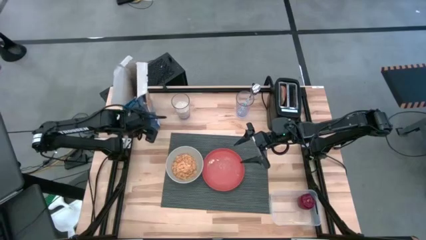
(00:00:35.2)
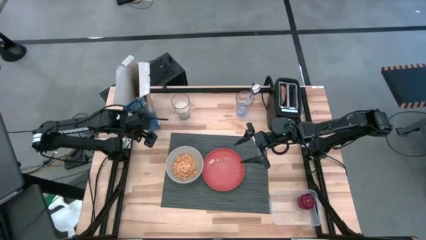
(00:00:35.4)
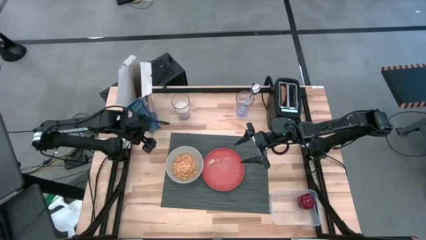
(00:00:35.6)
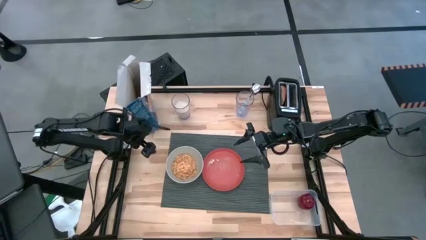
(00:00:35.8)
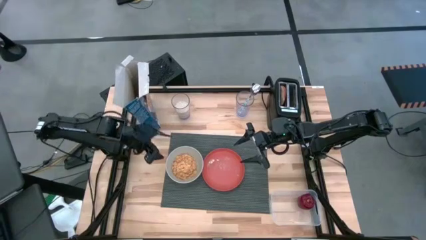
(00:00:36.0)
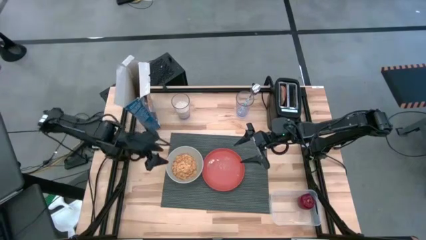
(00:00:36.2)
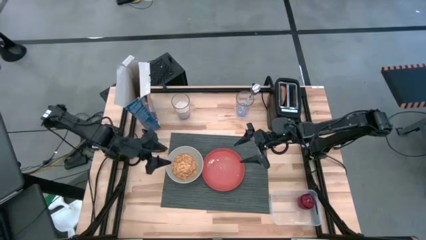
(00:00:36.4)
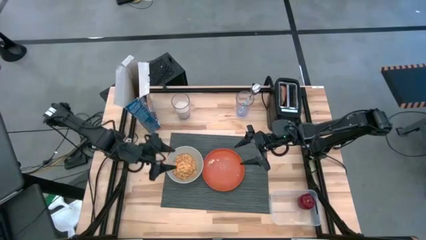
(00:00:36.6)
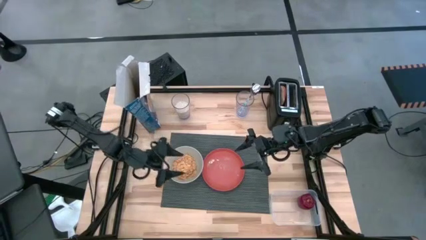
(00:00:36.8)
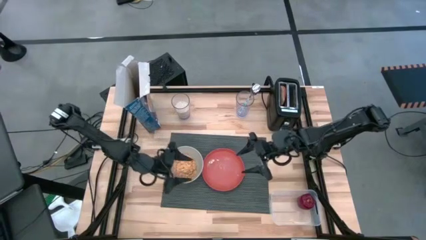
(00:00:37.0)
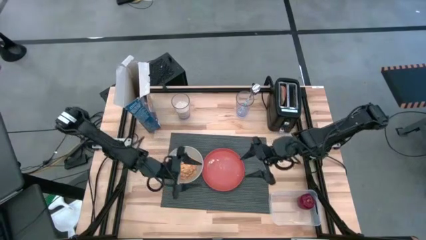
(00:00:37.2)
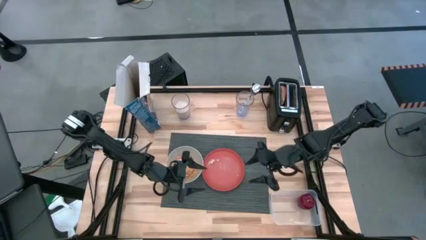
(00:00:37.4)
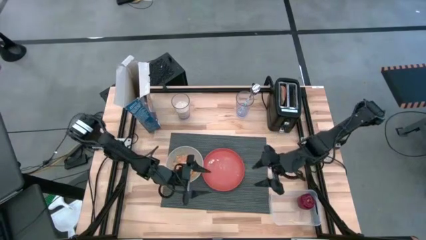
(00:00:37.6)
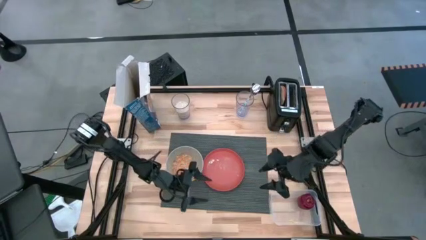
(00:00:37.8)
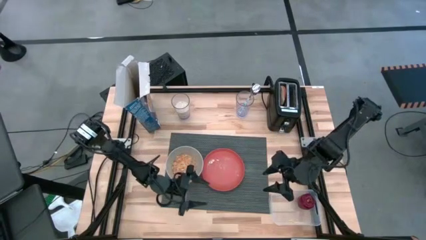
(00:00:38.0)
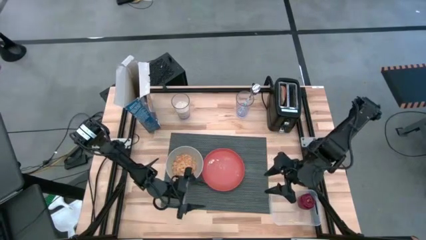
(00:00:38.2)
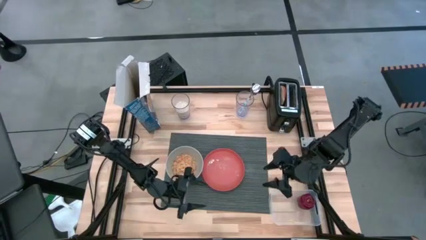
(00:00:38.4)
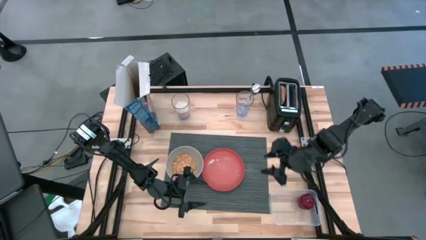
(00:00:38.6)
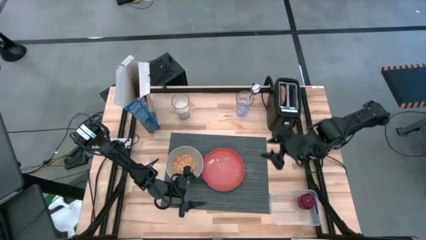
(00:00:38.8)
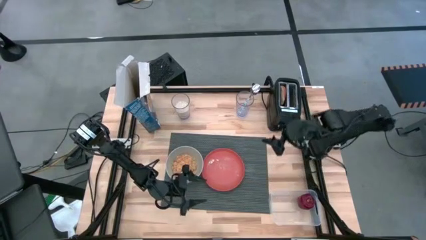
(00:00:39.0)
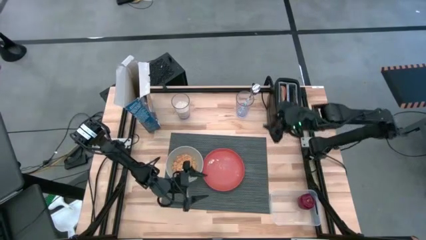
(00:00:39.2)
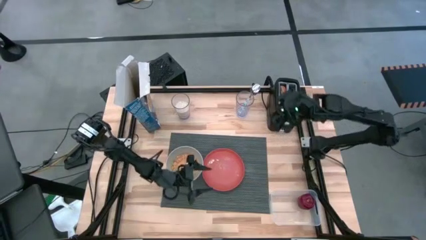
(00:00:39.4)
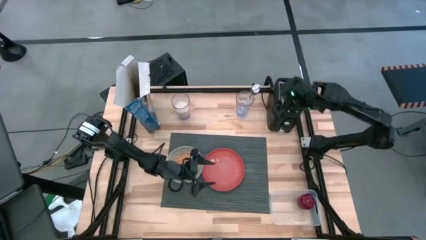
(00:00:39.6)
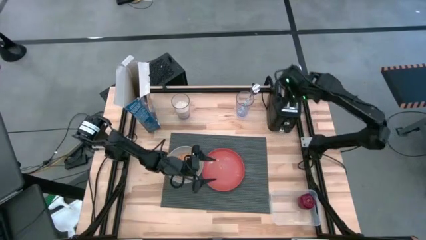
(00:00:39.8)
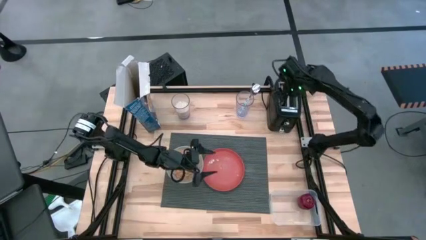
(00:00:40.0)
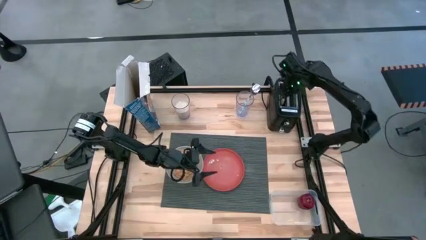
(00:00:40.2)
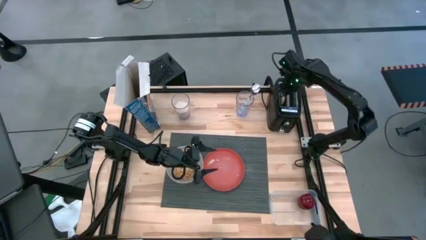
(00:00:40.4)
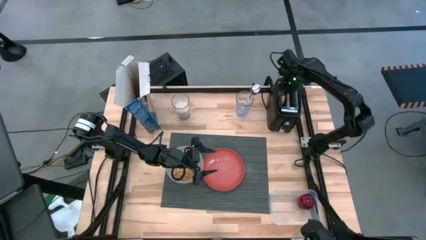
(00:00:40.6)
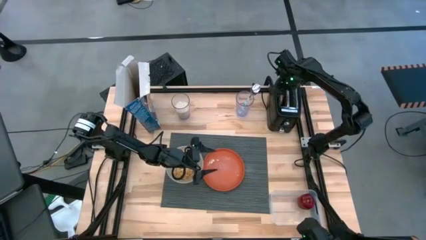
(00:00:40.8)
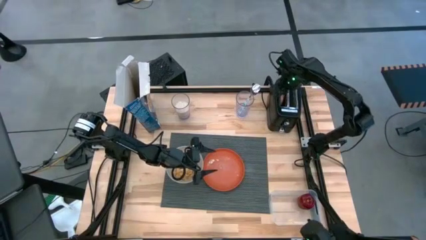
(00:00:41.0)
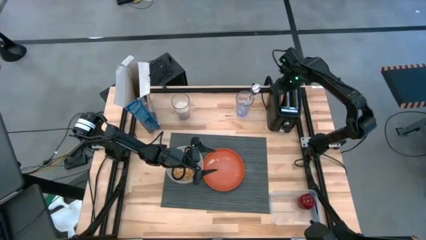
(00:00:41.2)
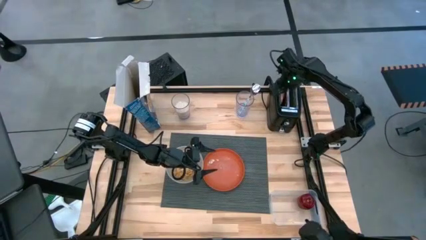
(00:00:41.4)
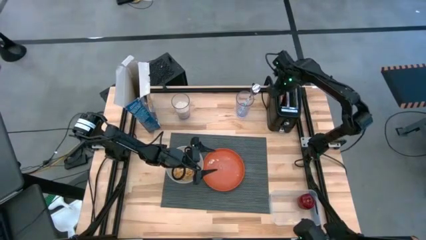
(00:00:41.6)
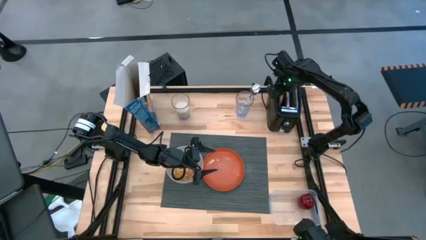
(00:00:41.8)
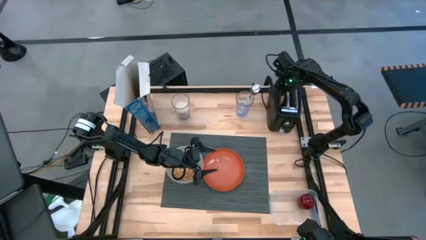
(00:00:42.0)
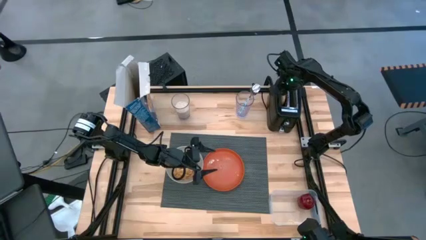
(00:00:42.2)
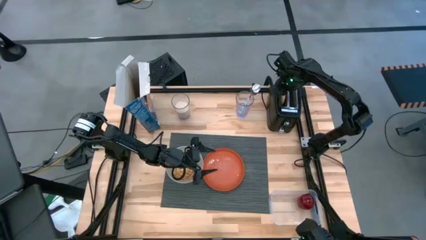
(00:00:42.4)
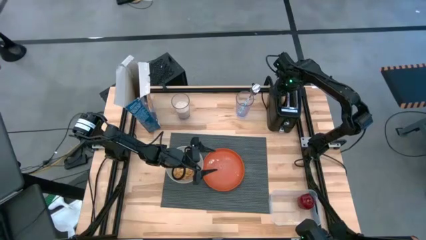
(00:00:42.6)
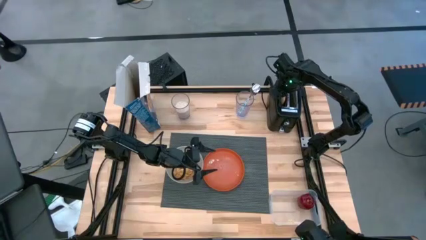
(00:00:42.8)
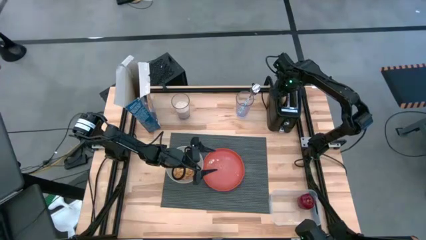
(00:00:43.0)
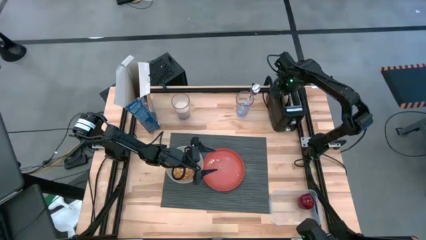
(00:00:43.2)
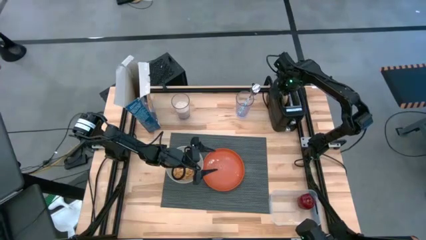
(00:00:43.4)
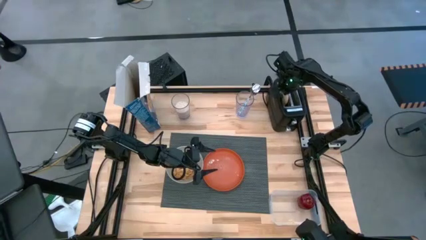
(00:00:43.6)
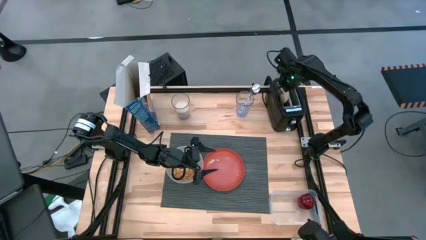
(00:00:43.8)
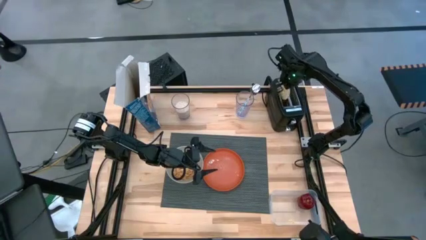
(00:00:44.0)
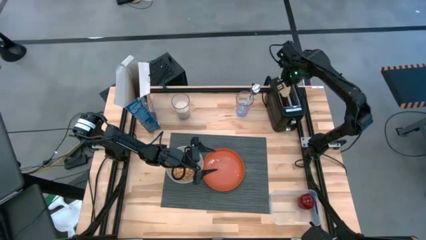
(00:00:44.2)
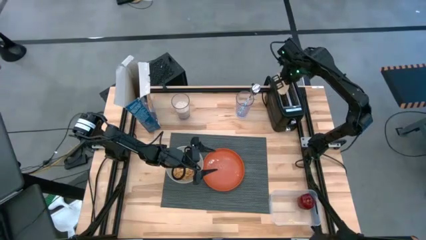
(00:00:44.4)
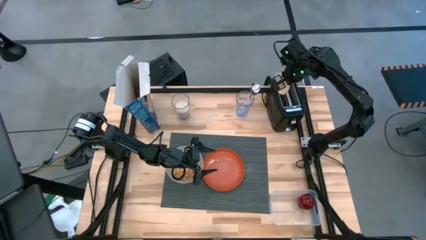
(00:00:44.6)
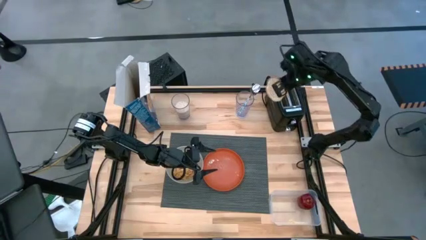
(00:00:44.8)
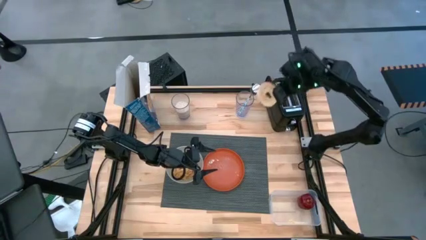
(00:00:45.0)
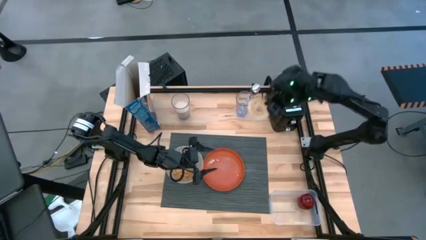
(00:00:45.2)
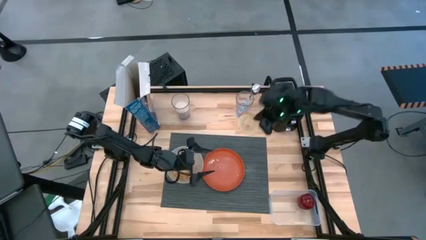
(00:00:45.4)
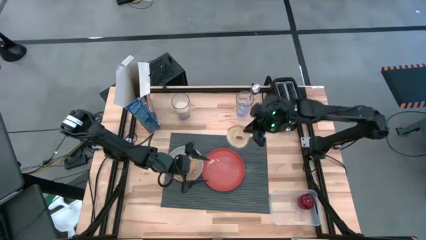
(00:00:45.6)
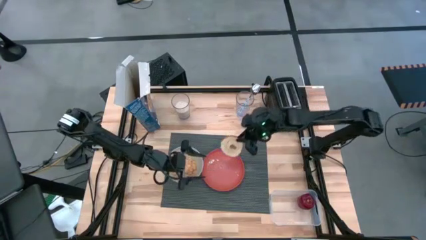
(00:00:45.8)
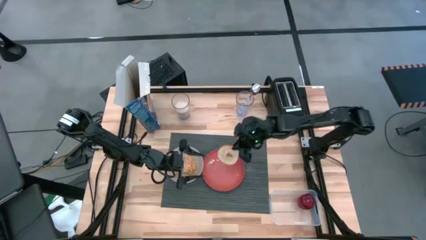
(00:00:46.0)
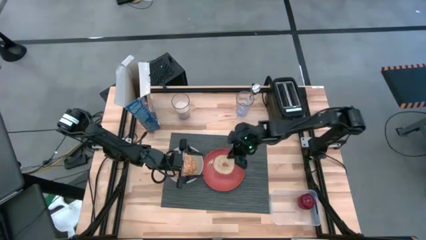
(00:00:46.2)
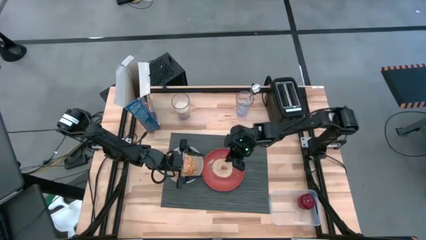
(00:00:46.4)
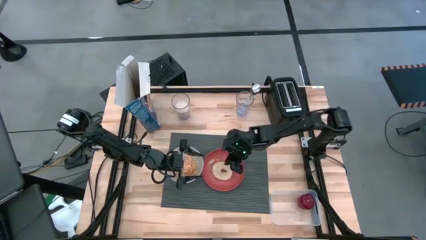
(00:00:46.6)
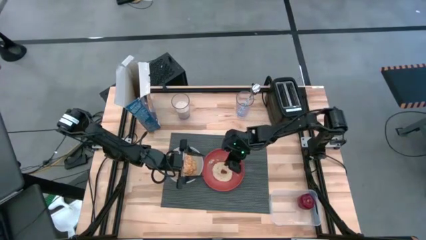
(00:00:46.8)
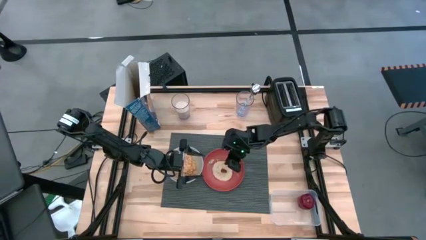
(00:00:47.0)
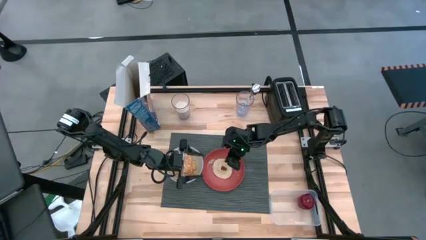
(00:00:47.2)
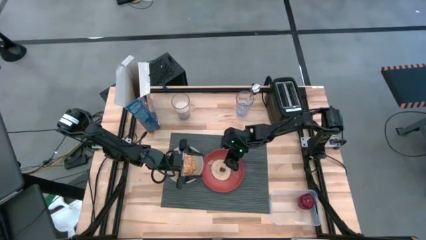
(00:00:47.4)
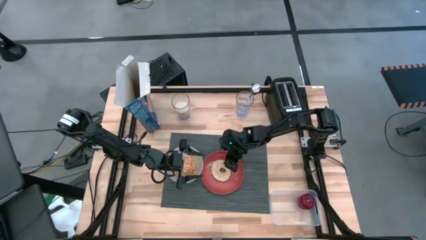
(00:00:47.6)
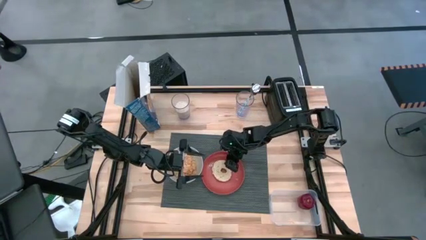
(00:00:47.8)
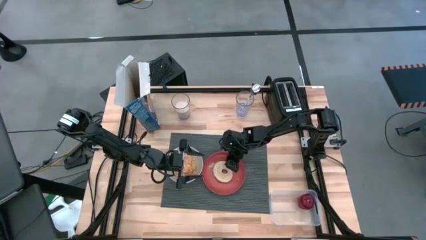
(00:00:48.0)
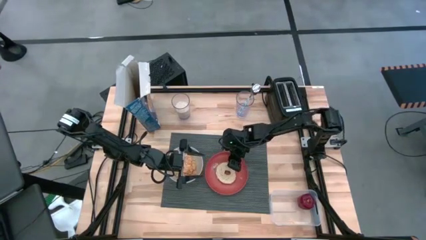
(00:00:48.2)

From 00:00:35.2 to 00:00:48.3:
Task: Arrange a breakfast setting
Put the bread on the plate
